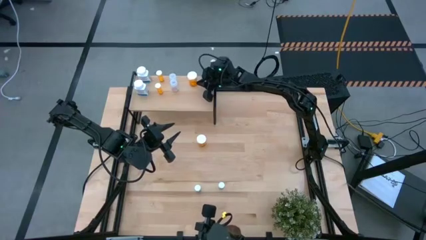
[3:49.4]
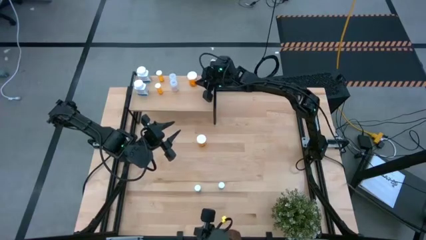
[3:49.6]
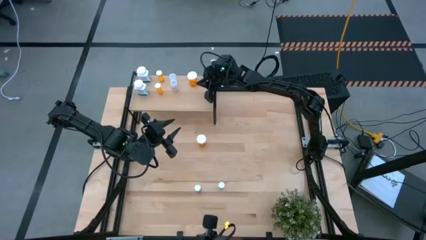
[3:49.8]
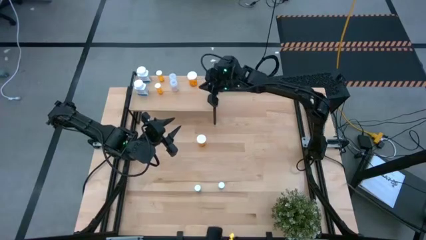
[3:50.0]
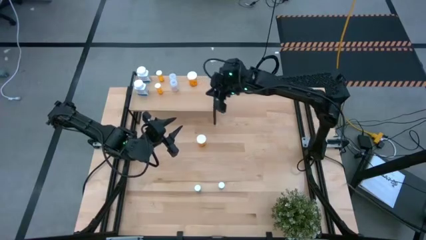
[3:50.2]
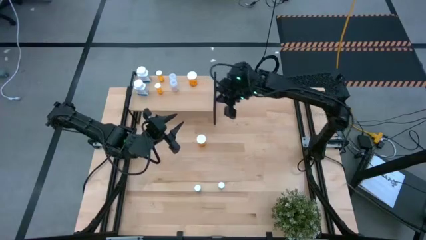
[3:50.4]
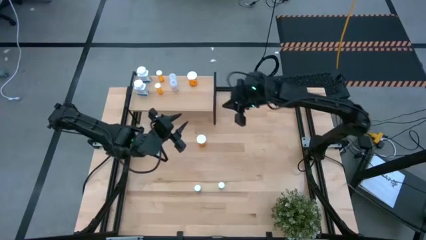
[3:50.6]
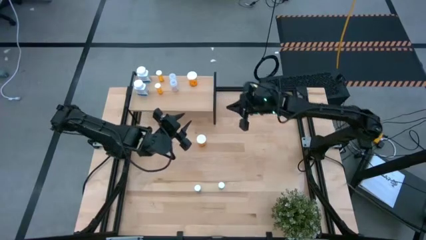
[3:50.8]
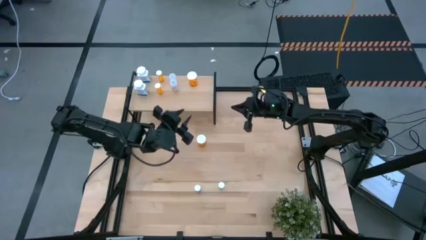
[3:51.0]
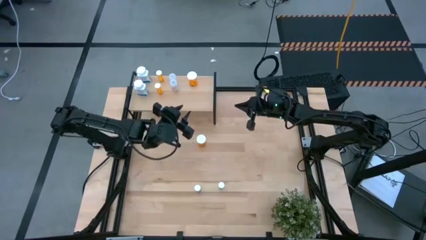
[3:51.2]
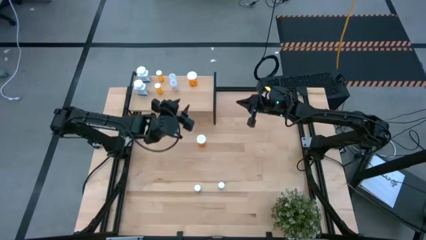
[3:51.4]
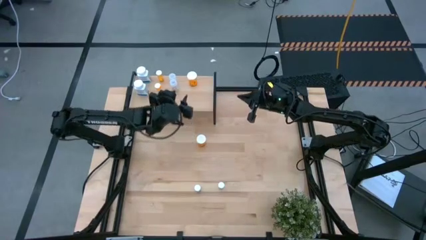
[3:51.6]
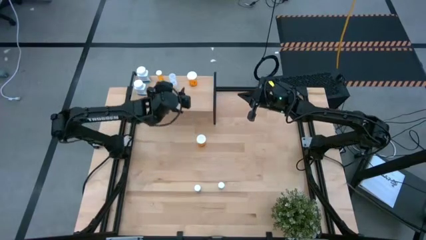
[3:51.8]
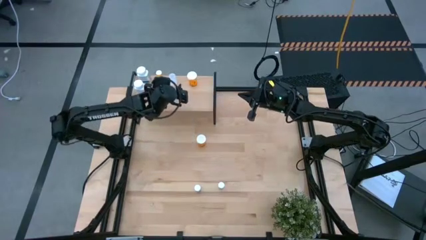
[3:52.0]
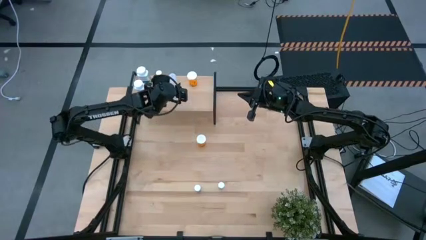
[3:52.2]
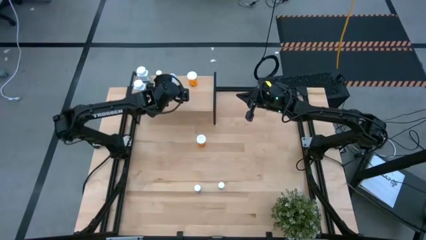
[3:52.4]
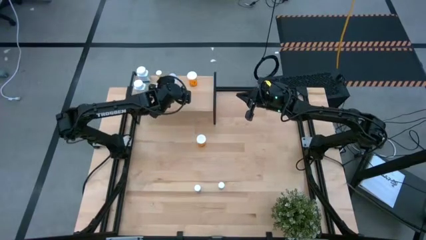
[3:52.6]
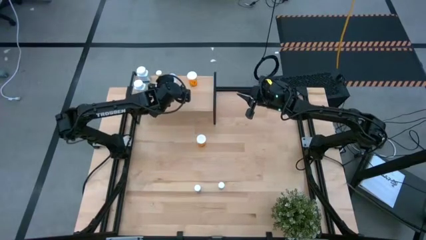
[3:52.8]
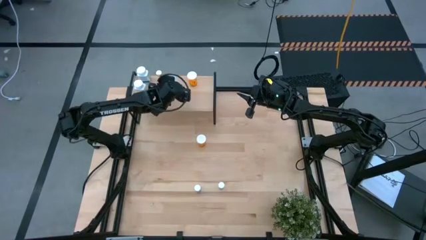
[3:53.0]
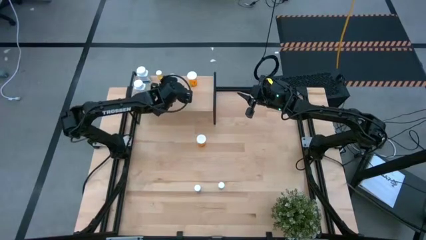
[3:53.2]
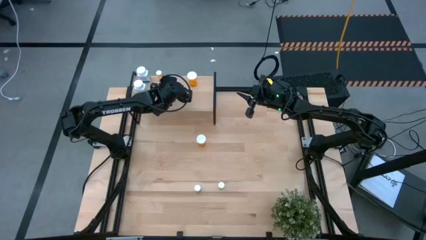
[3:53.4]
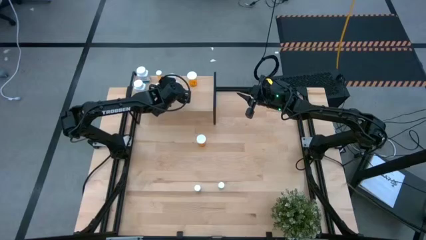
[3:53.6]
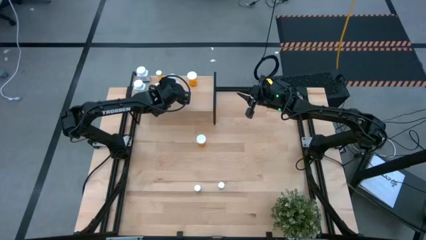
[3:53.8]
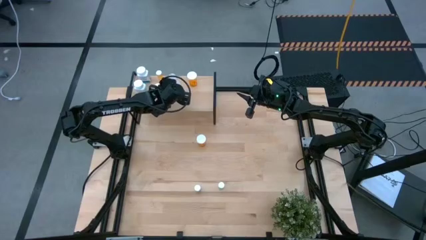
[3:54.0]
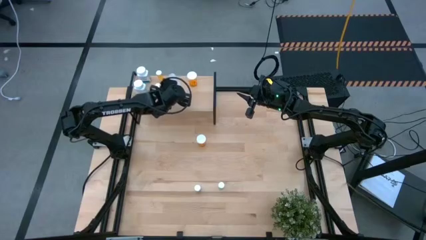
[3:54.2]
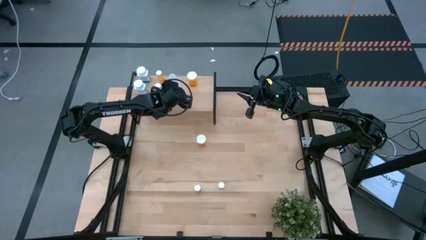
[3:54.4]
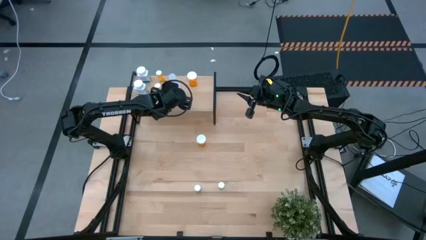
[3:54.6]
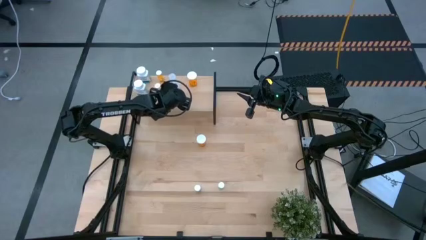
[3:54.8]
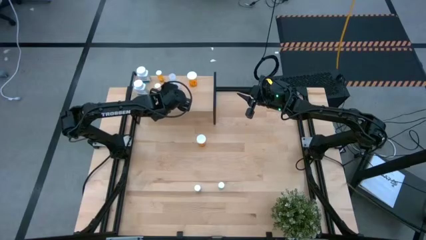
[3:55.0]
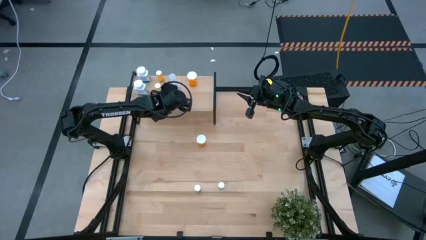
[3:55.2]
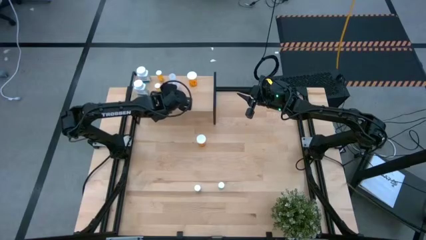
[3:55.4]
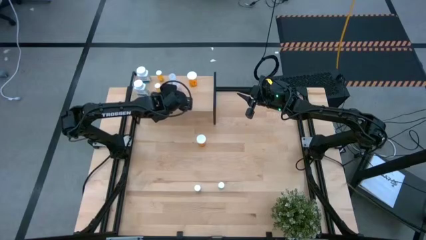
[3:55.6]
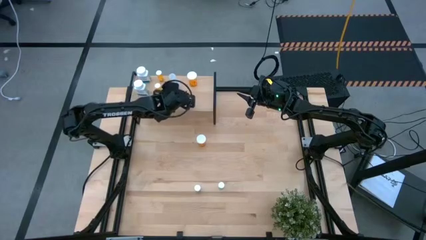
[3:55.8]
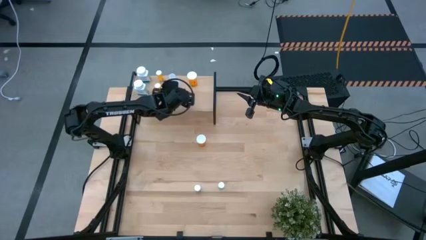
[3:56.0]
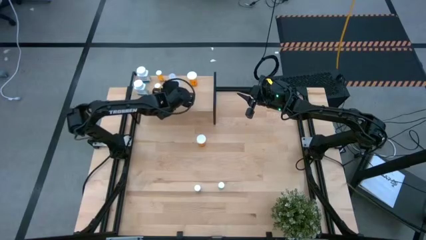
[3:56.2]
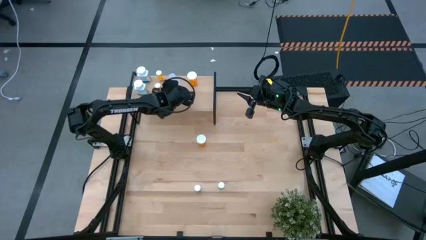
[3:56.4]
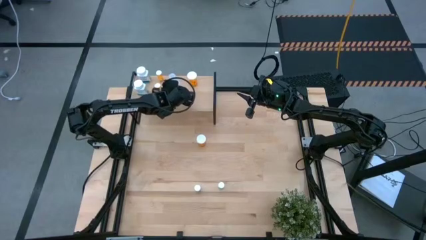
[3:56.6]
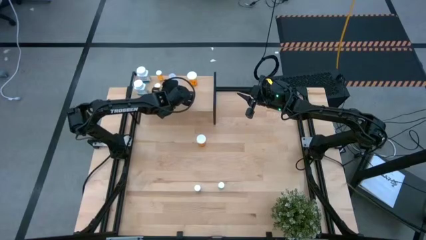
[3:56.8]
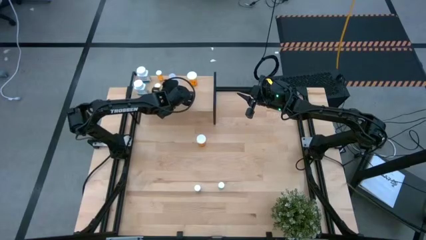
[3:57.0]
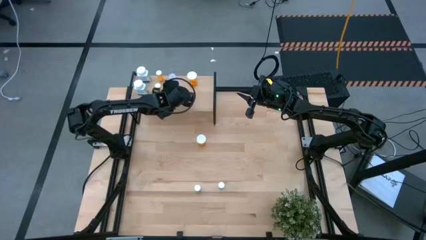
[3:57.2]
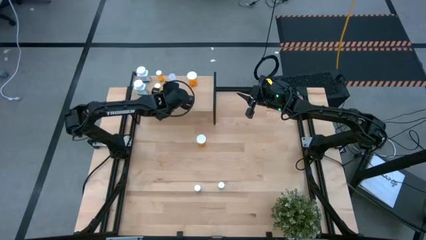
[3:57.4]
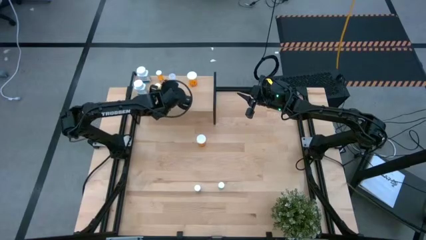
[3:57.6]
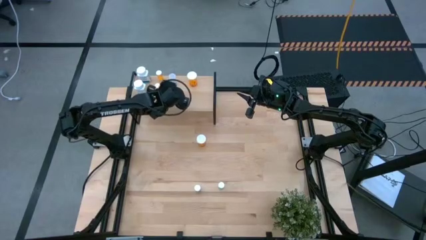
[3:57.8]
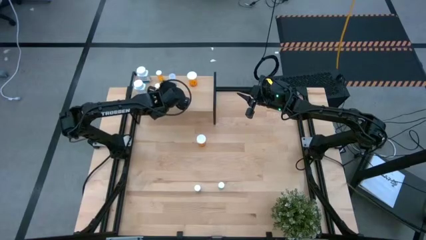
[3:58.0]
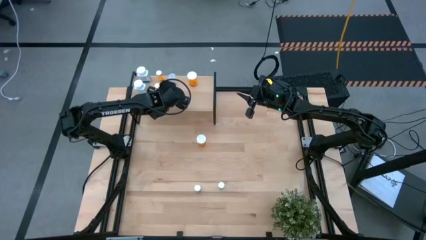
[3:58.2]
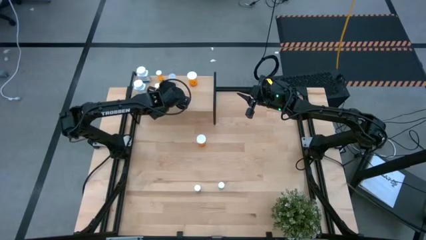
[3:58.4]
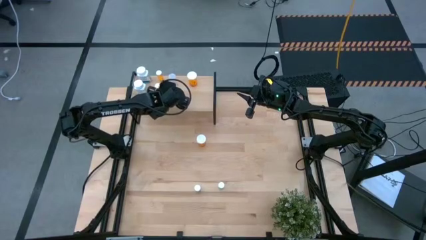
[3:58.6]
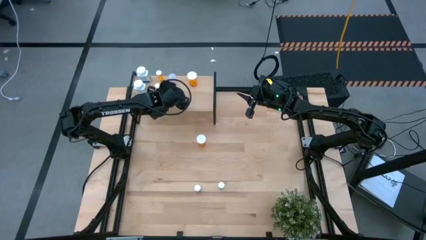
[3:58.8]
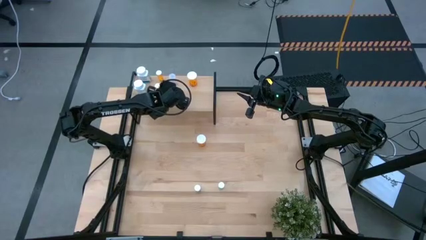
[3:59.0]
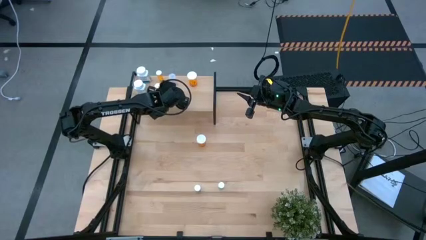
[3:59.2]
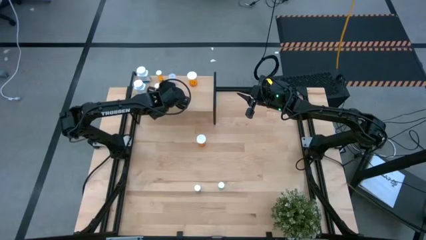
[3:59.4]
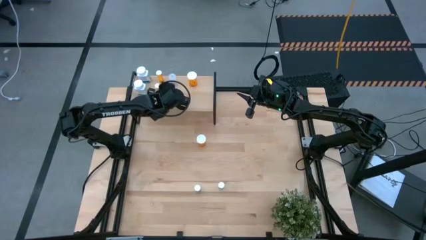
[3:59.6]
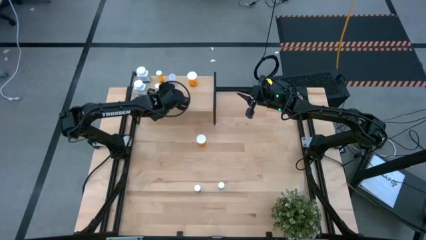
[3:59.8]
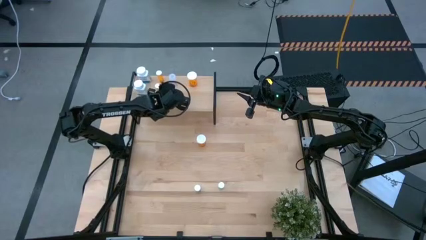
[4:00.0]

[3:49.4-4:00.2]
Task: Pick and place medicine bottles onto shelf by color
Adjust the transparent pill bottle on the shelf

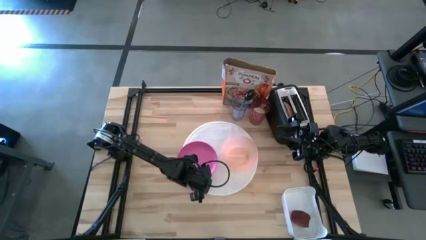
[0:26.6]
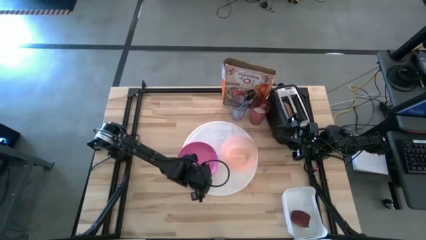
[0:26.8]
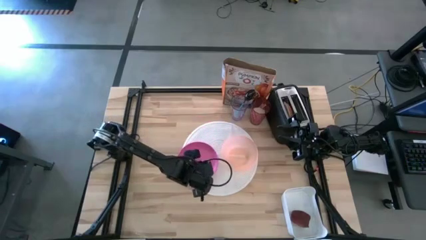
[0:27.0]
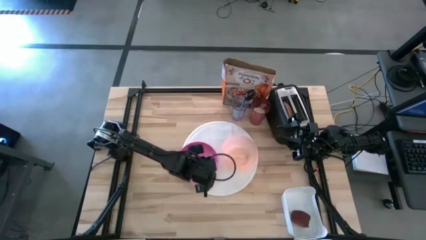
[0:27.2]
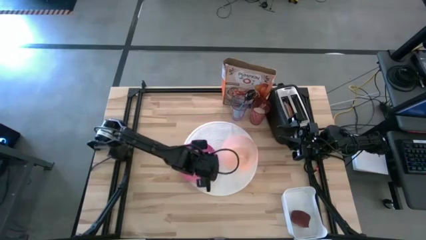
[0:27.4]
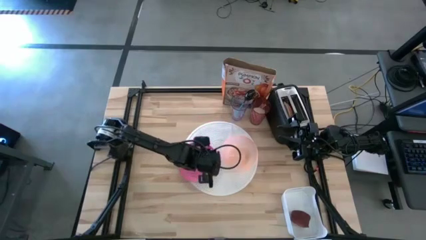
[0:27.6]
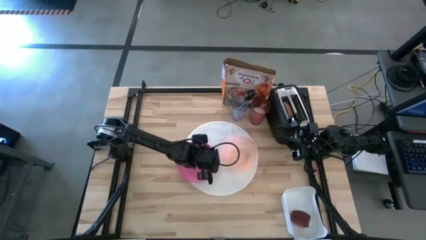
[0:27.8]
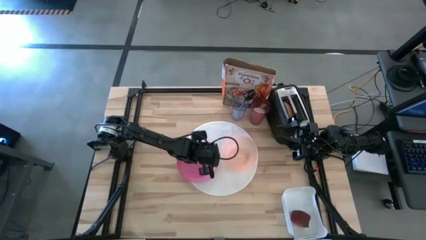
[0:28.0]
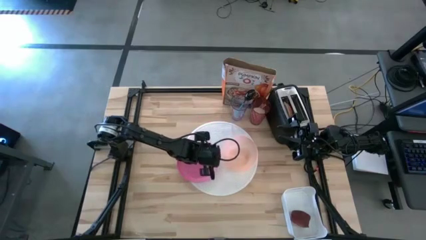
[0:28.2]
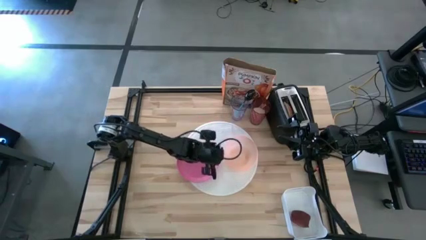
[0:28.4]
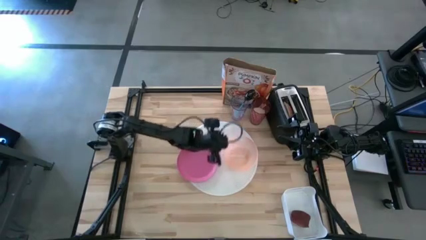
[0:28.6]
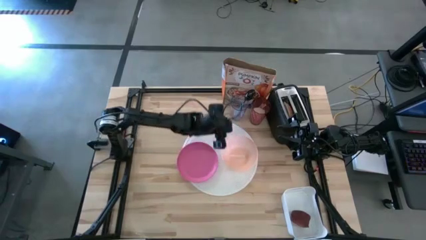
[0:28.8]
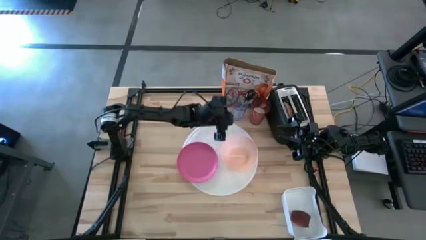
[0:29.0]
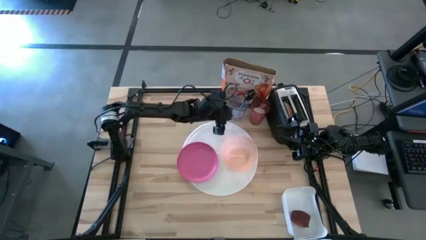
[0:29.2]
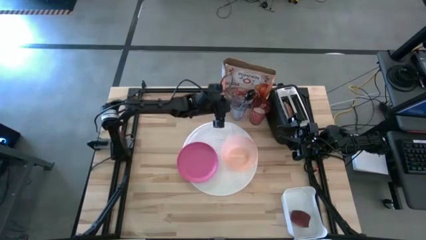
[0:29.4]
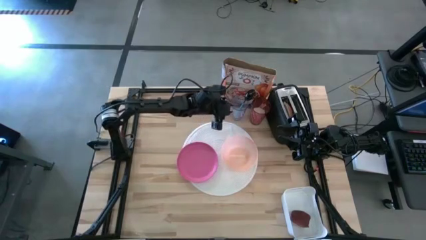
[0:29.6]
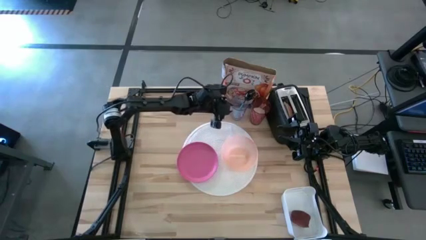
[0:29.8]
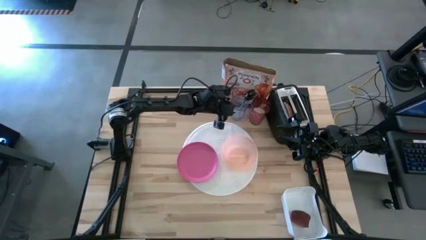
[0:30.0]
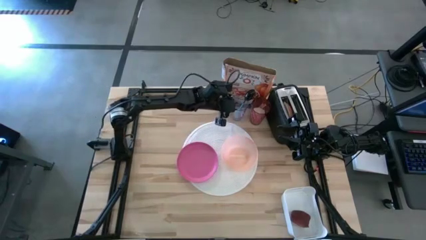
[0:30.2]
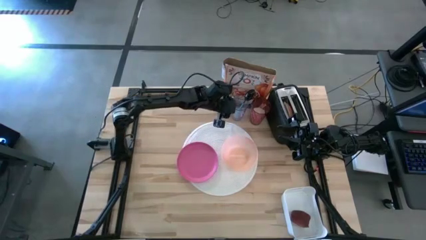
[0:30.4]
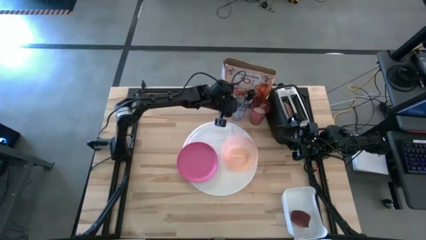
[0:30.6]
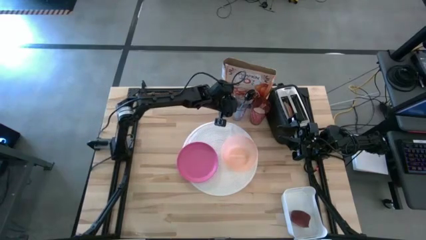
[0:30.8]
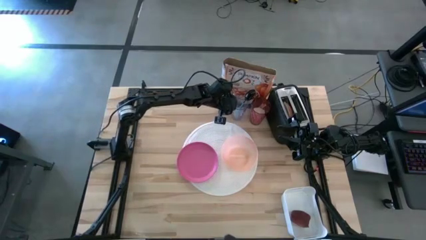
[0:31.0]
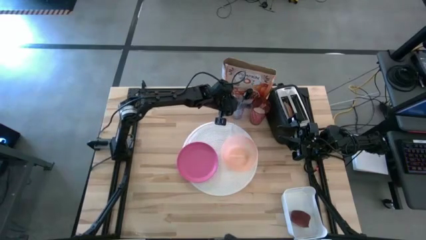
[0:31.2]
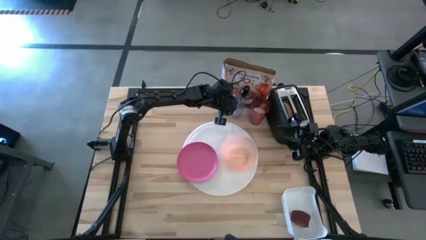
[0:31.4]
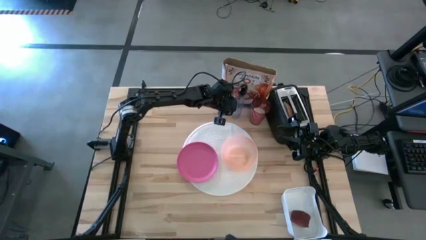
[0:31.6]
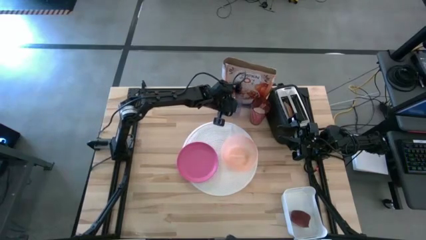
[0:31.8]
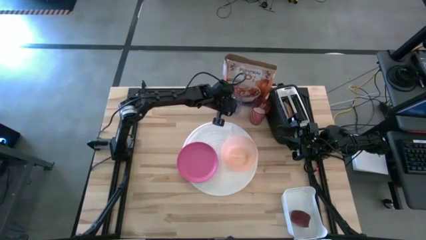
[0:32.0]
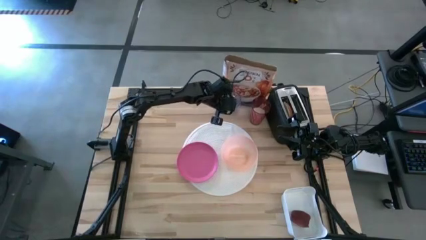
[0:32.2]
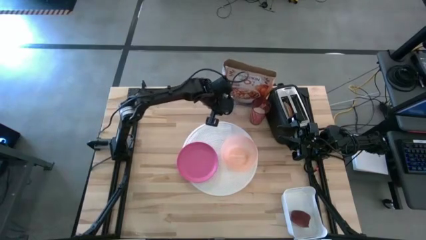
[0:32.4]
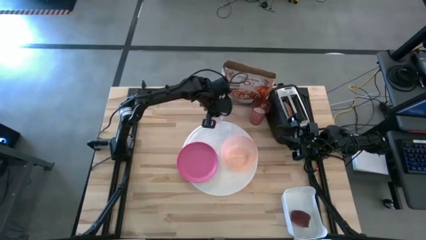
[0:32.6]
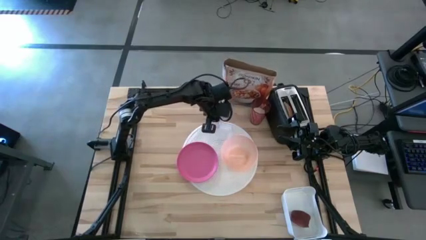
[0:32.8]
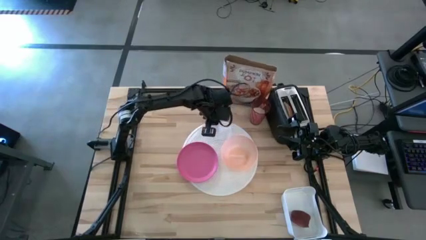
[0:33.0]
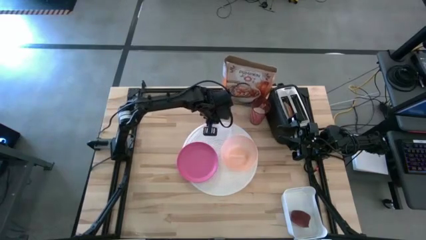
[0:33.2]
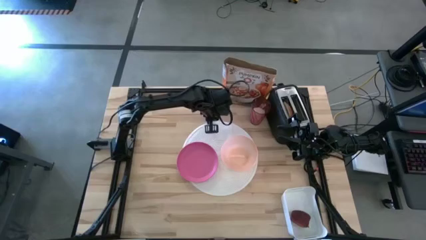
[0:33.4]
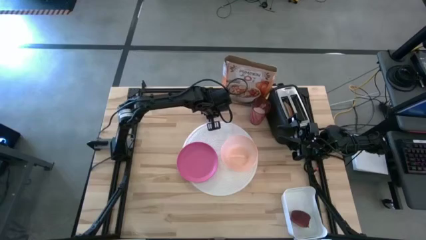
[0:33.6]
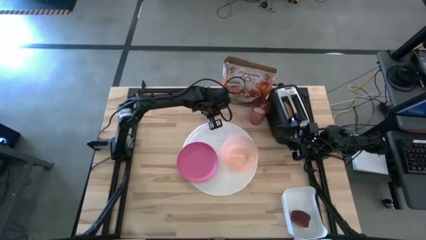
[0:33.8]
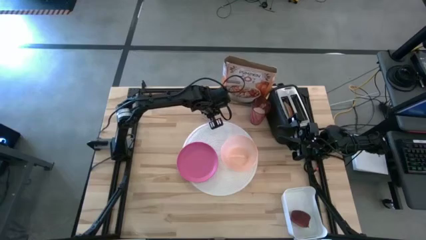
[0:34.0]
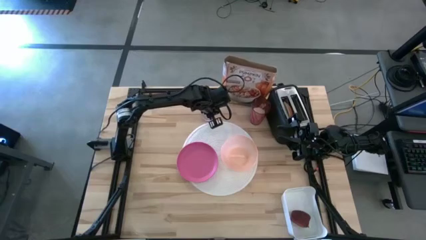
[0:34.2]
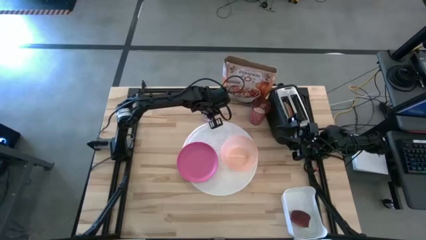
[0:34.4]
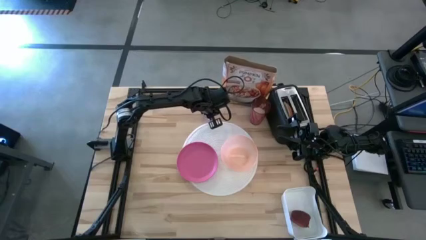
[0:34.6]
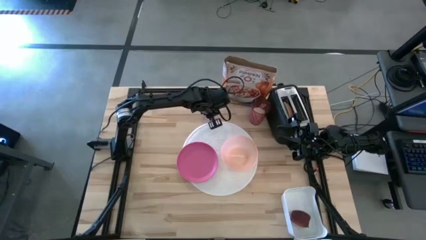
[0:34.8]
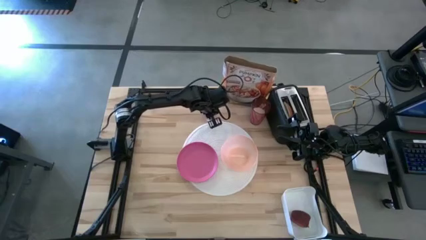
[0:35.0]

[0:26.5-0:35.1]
Task: Arrange a breakfast setting
Move the transparent glass on the top center of the table
